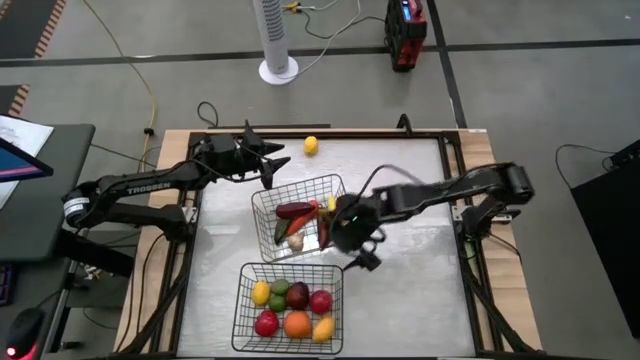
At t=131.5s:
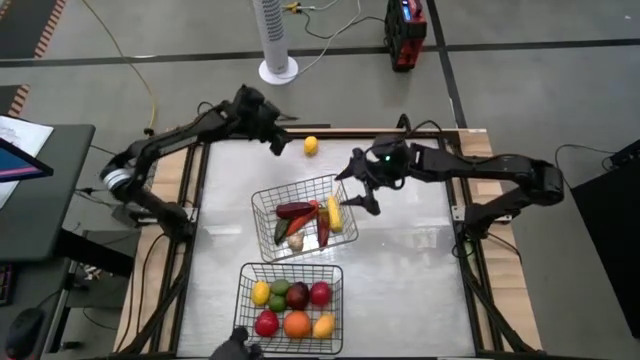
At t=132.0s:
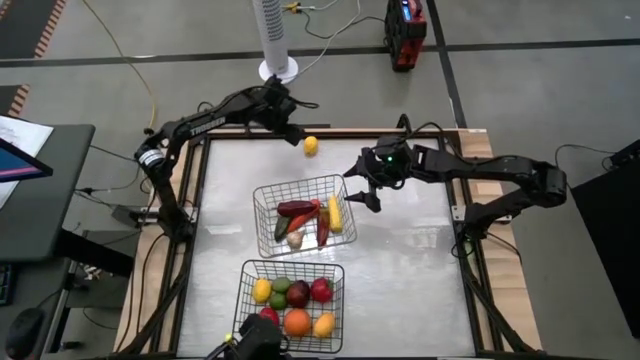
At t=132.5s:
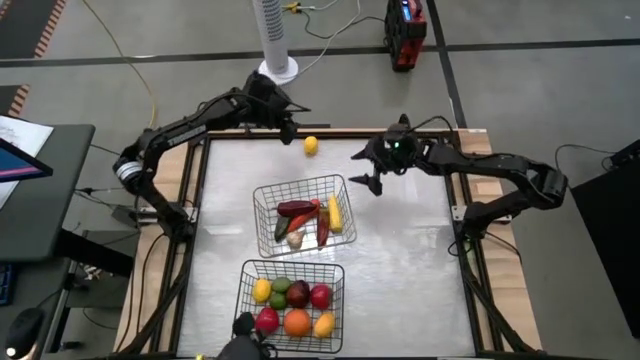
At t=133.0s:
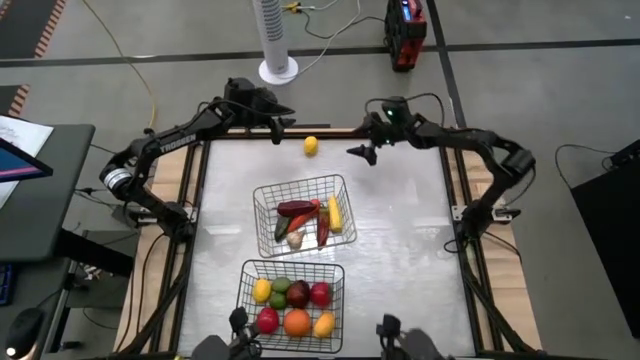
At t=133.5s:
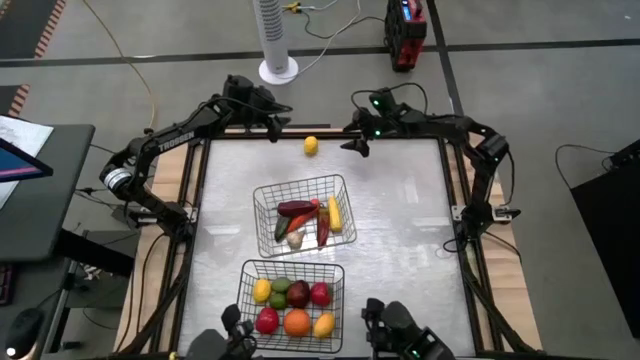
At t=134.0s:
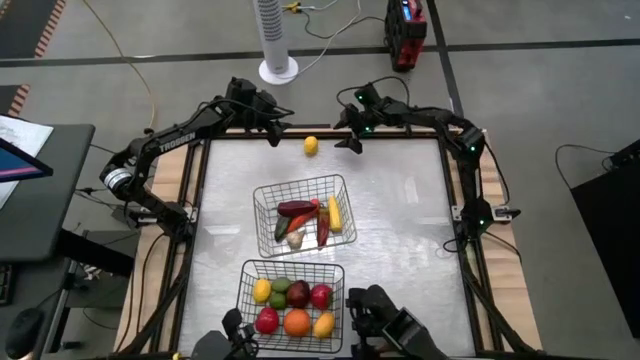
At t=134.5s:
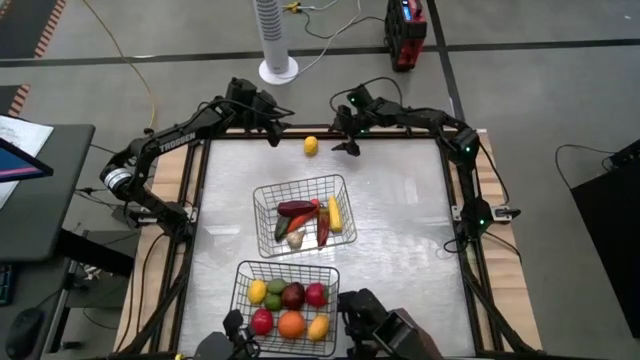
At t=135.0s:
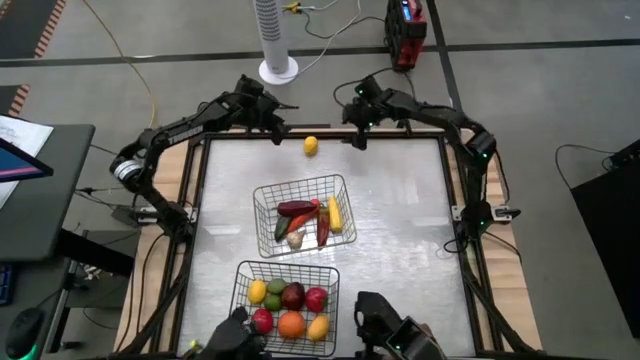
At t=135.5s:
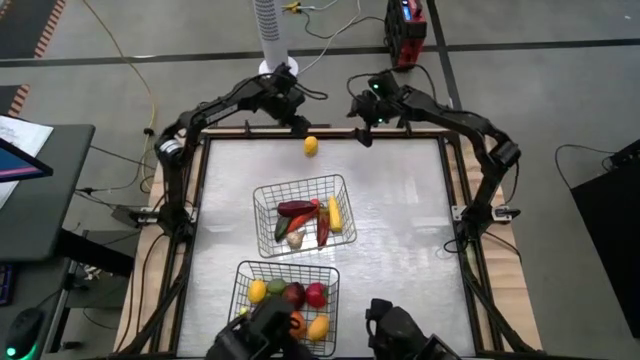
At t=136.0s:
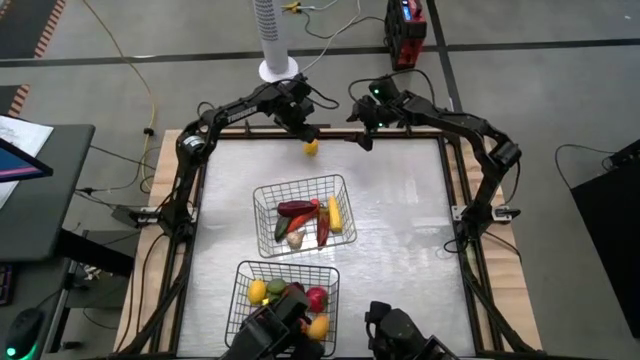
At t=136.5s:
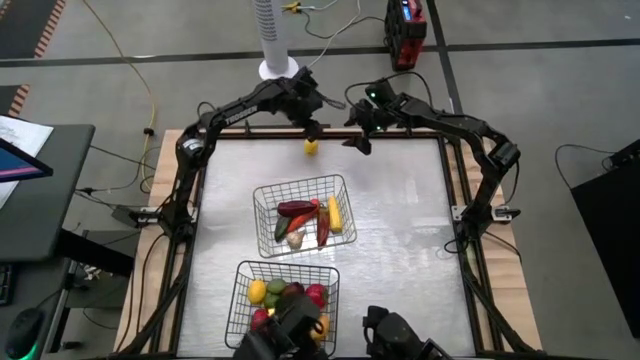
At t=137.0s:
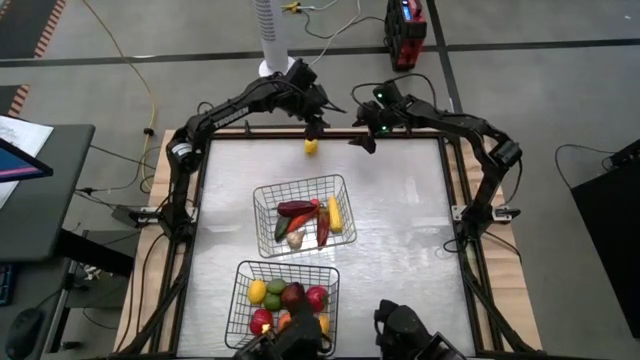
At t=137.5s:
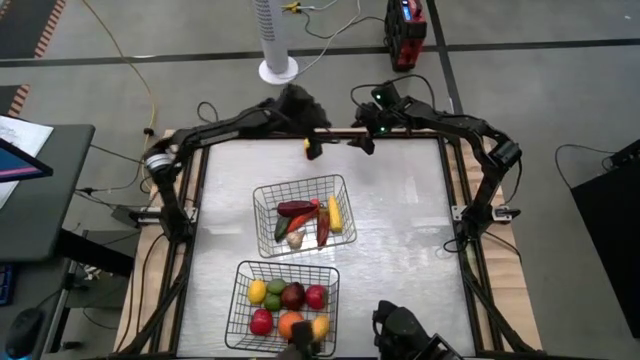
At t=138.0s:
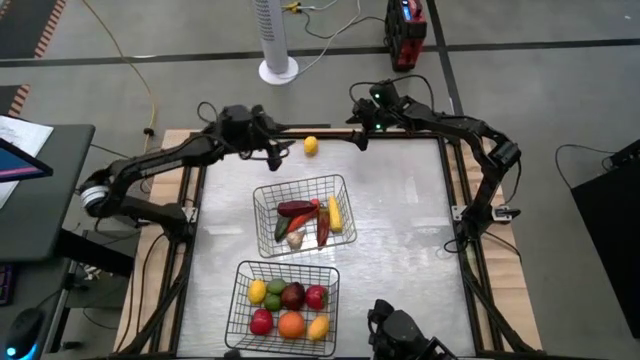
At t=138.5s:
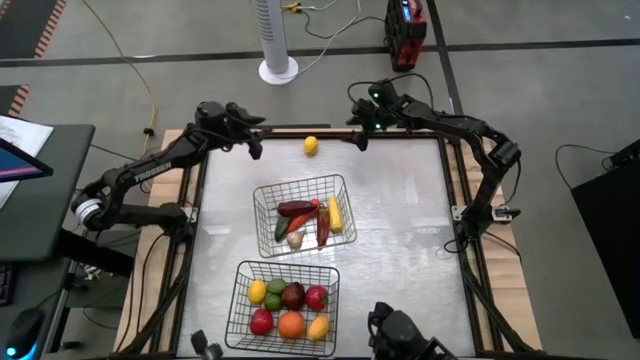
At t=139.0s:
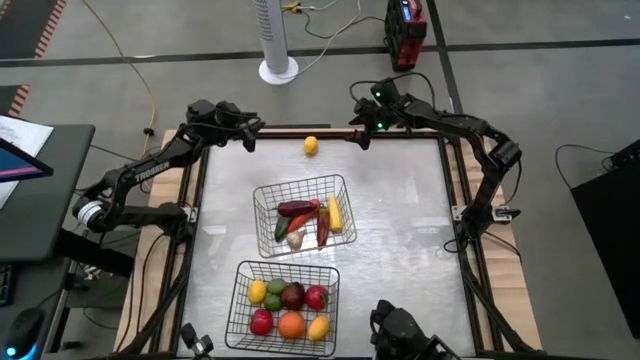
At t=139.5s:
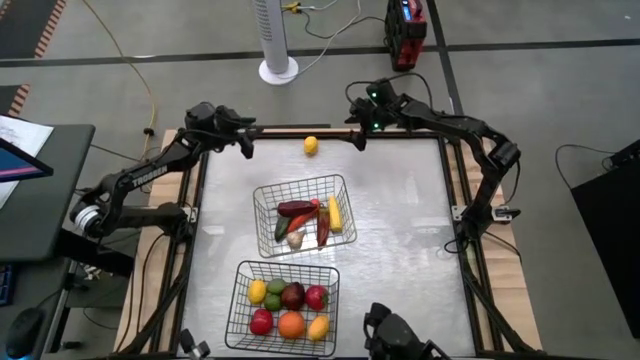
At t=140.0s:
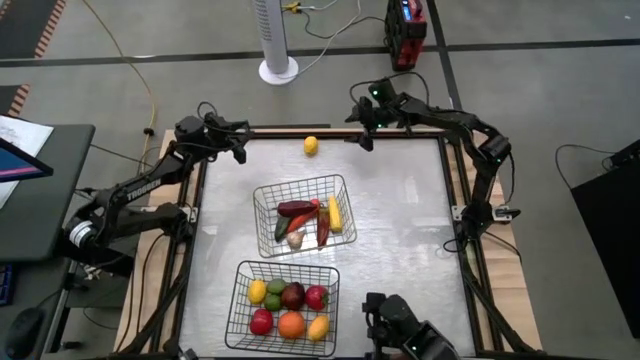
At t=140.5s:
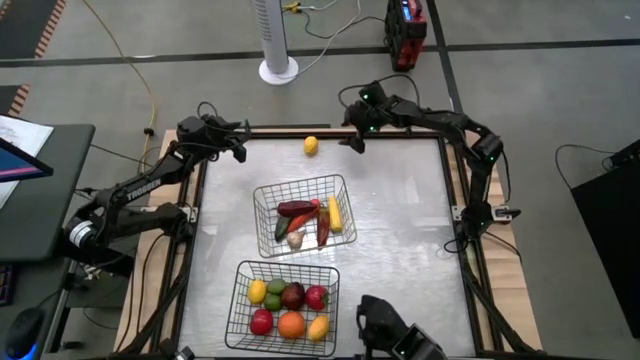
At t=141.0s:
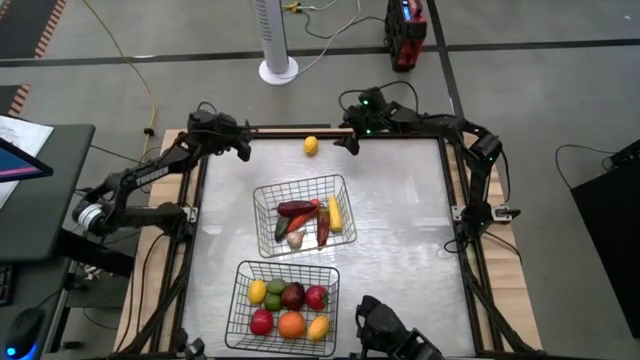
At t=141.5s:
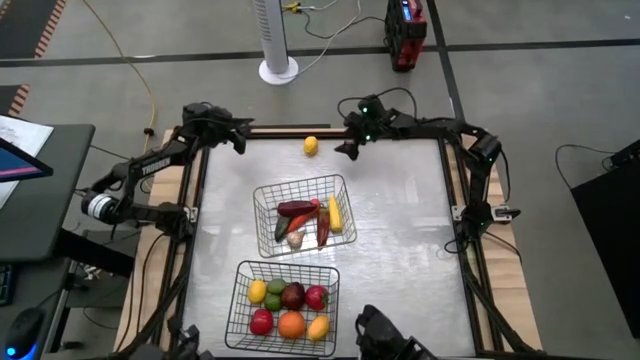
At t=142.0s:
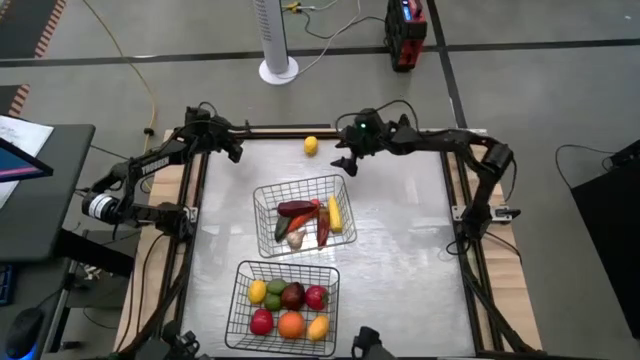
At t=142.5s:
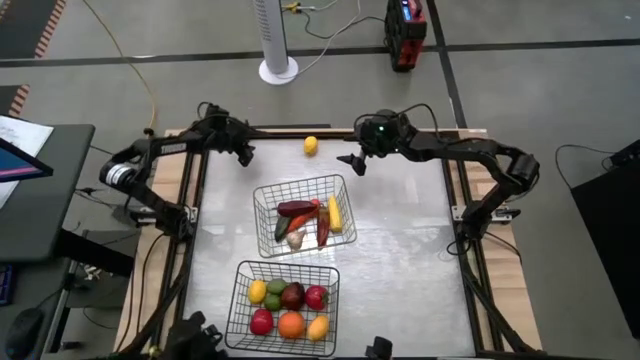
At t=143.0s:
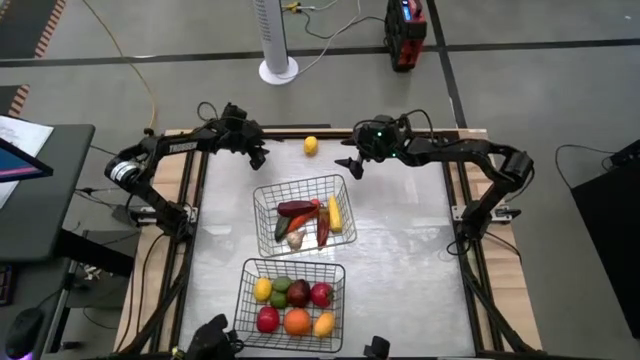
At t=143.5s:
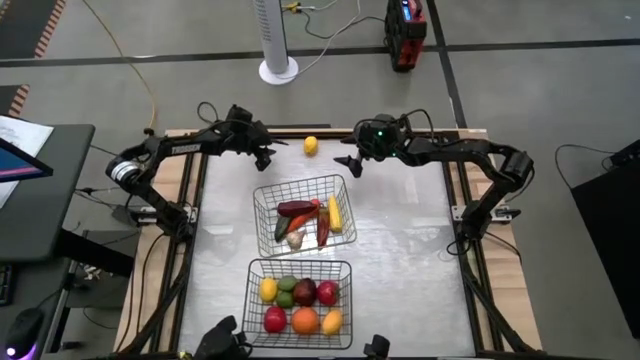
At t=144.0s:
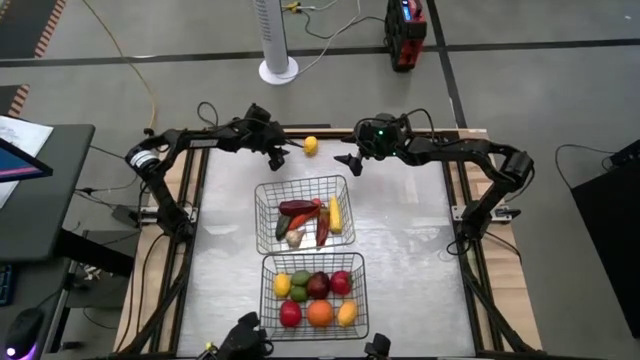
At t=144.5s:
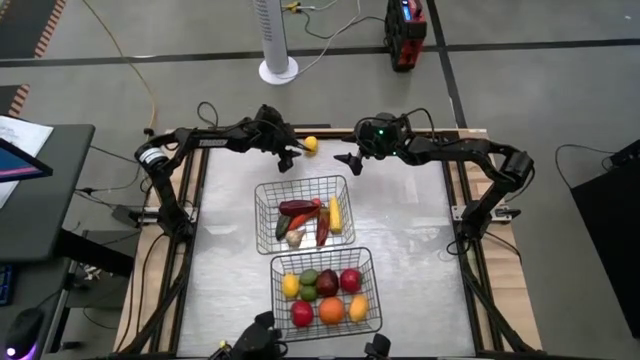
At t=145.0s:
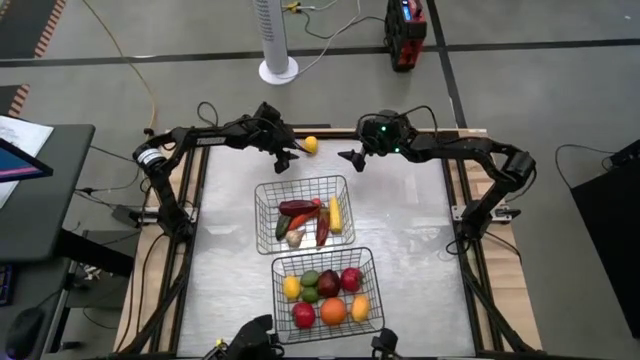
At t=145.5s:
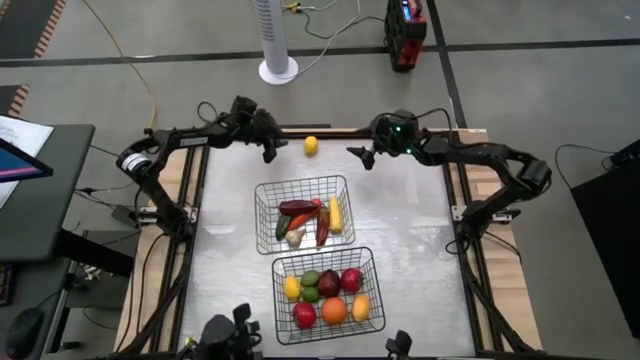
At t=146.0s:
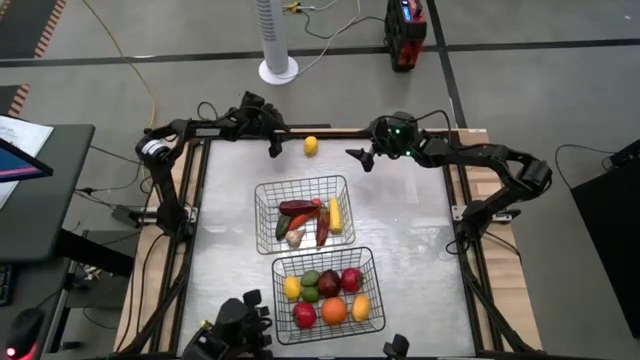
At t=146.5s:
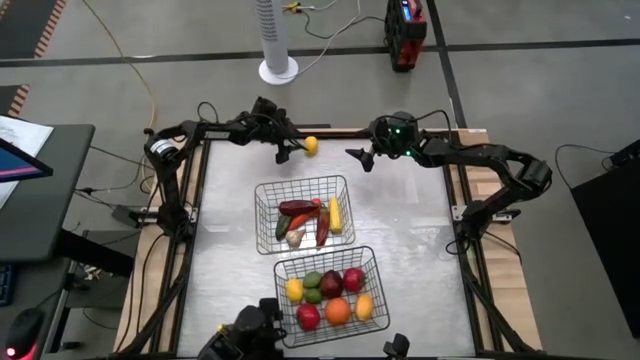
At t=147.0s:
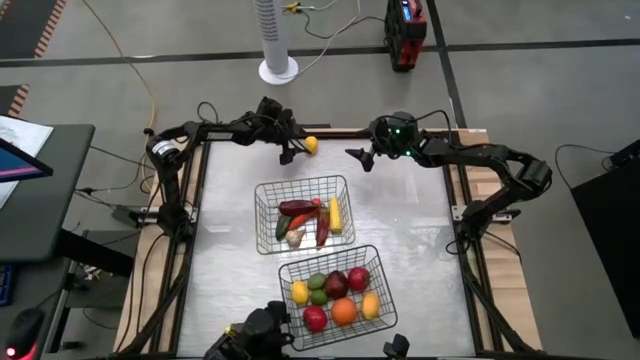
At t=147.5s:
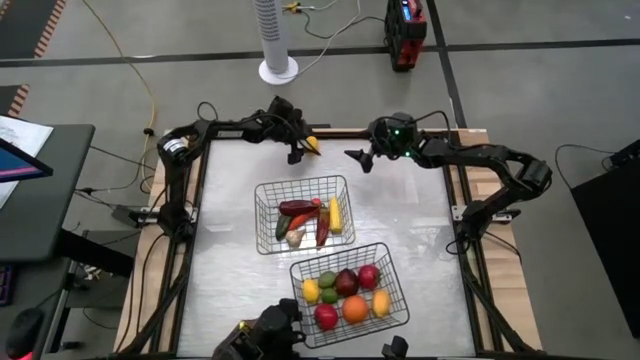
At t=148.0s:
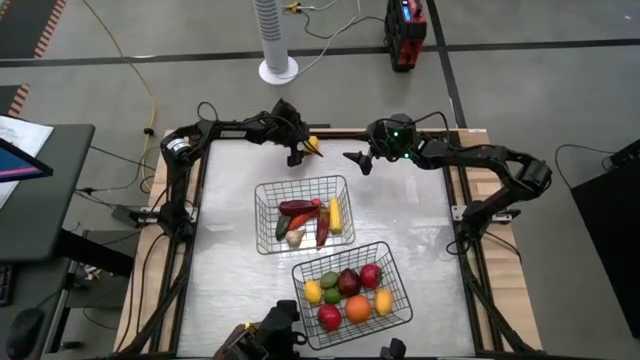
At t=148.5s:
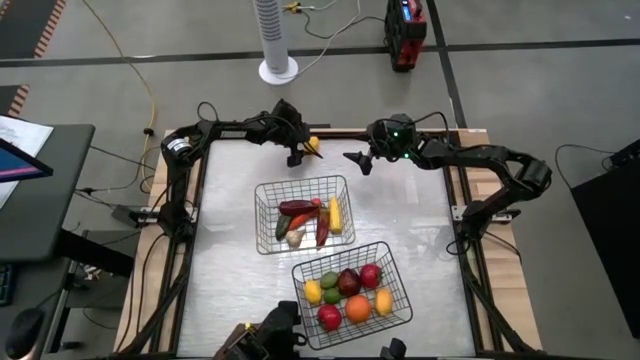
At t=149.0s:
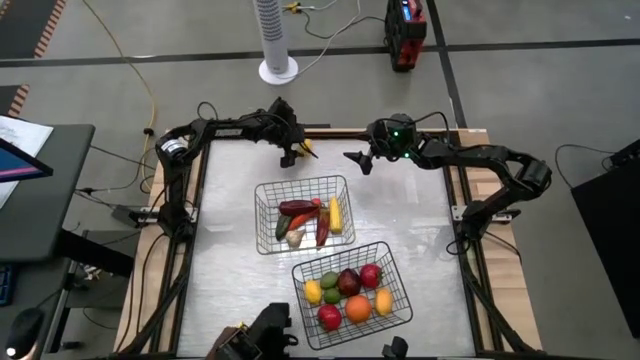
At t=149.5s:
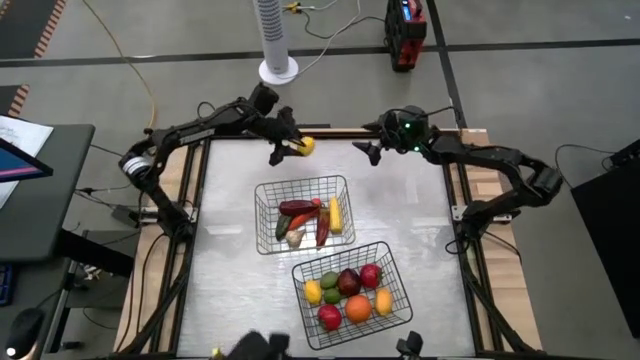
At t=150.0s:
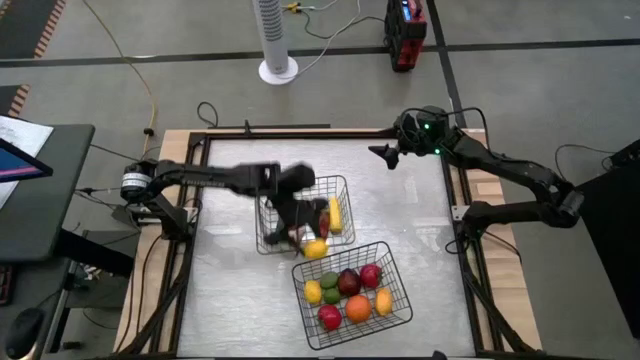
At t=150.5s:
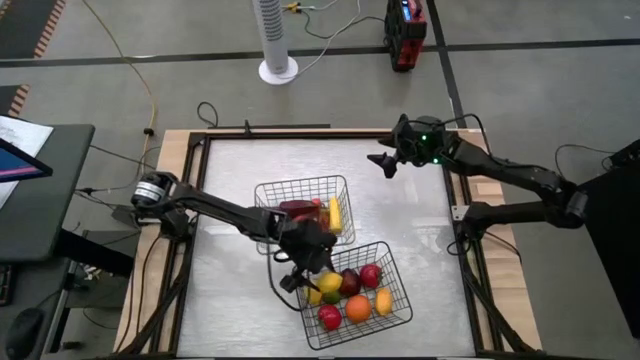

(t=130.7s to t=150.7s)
Task: Sort produce into baskets
Put the lemon into the bottom wire basket

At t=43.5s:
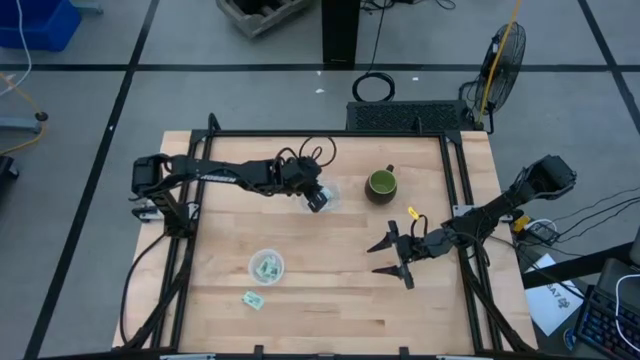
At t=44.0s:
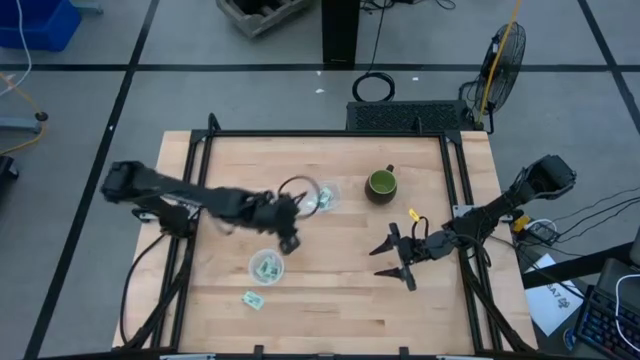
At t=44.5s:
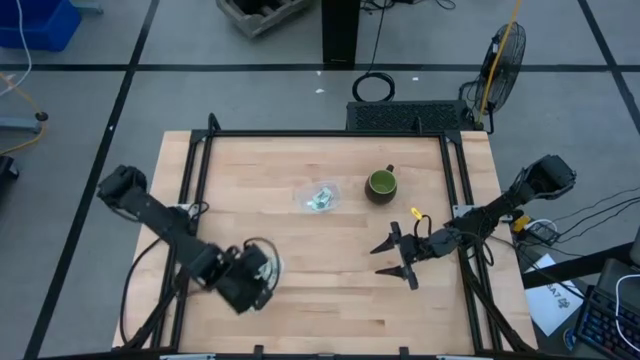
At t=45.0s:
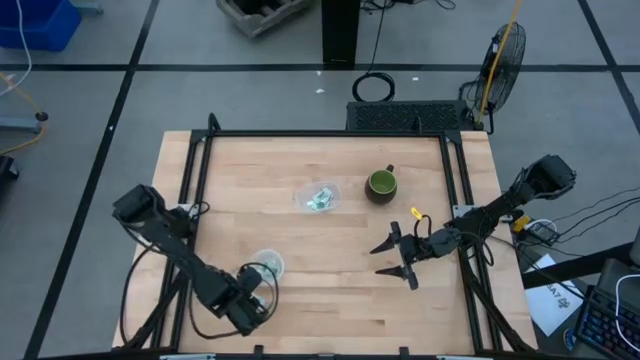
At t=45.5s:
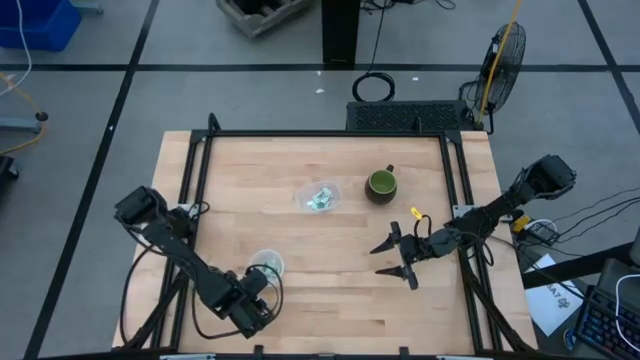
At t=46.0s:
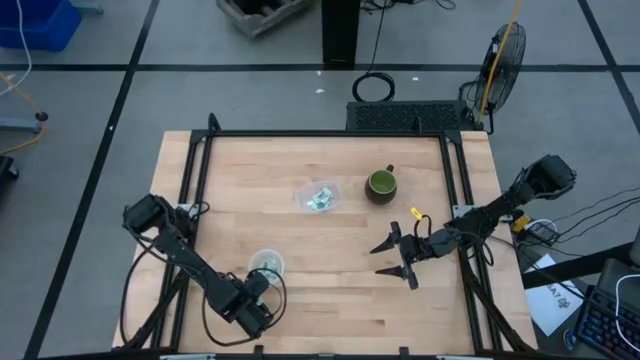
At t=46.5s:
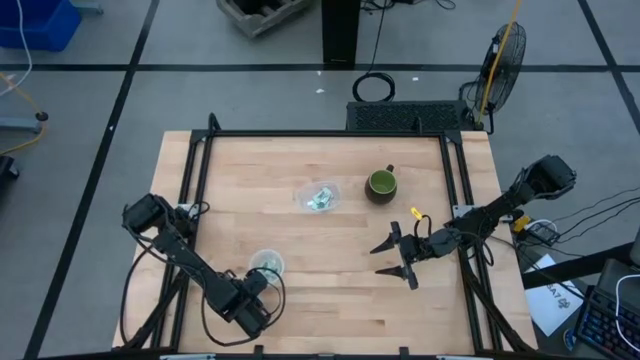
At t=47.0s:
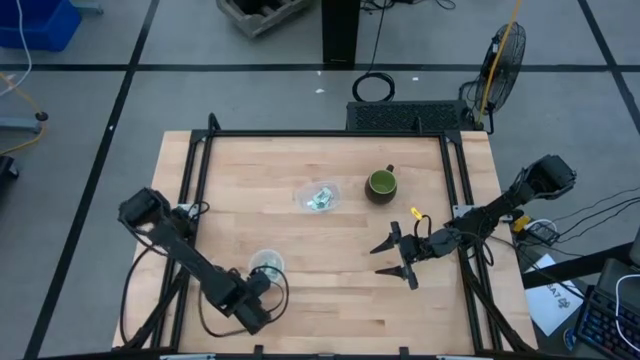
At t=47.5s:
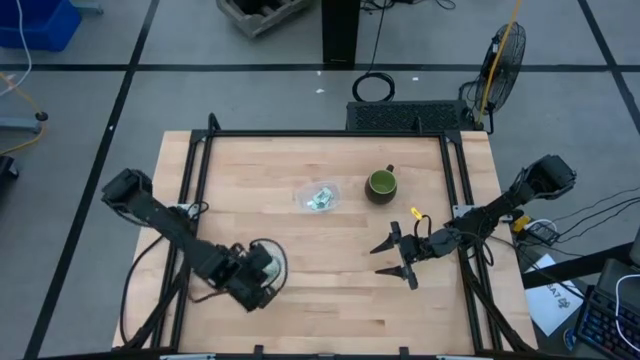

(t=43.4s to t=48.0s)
Task: Pick and place Stevia / Truvia into bins
Put the stevia packet into the round container
